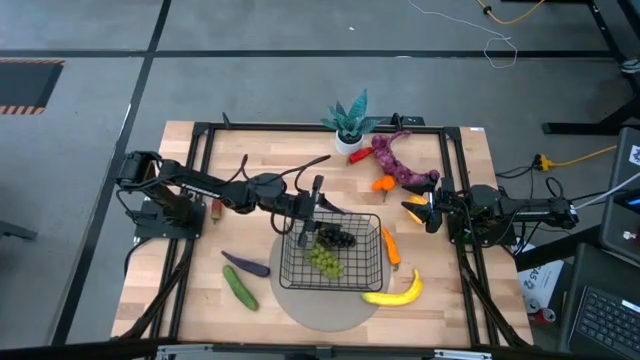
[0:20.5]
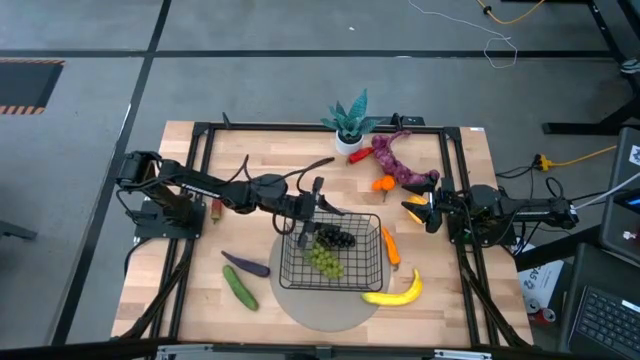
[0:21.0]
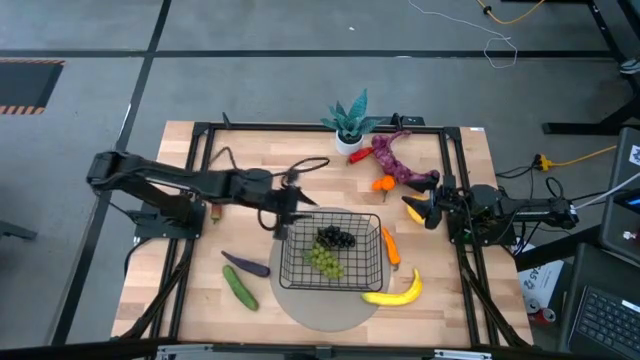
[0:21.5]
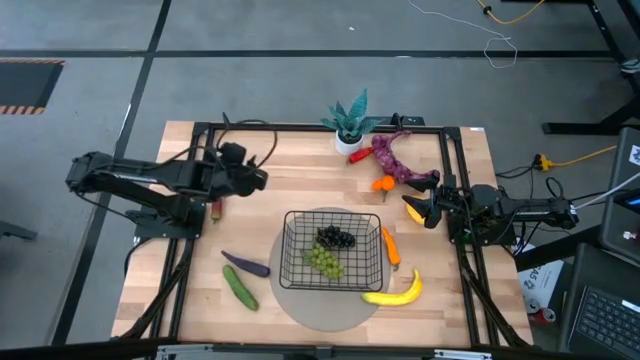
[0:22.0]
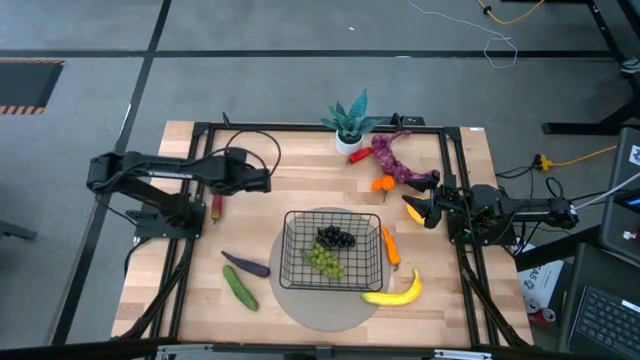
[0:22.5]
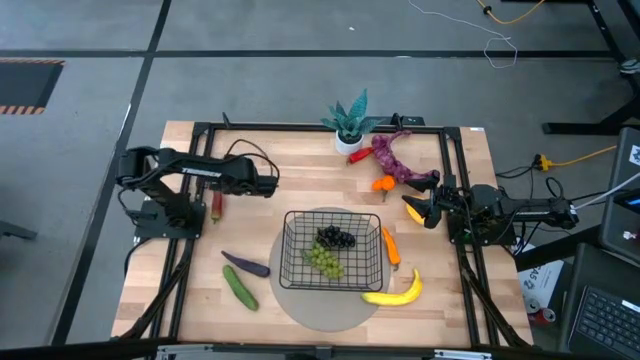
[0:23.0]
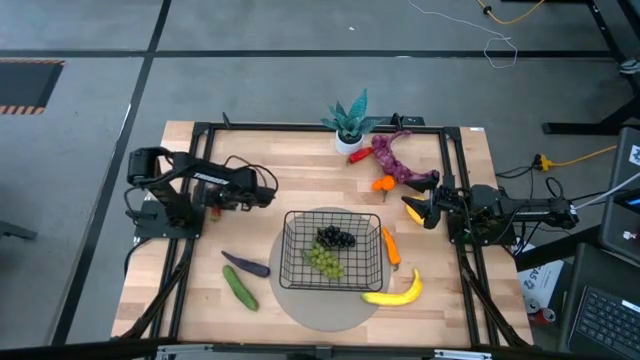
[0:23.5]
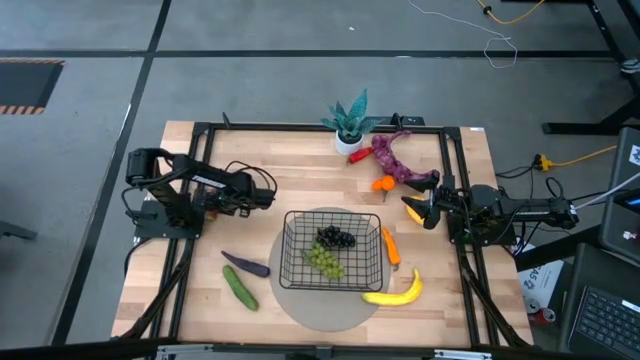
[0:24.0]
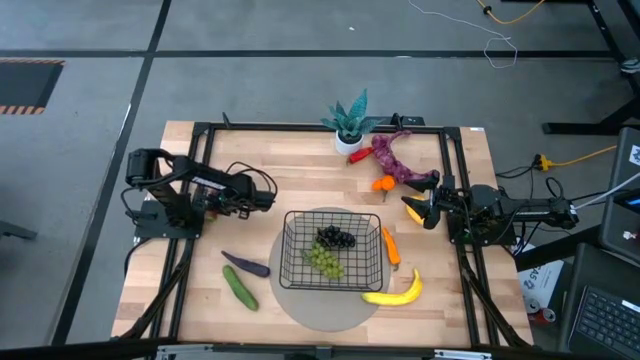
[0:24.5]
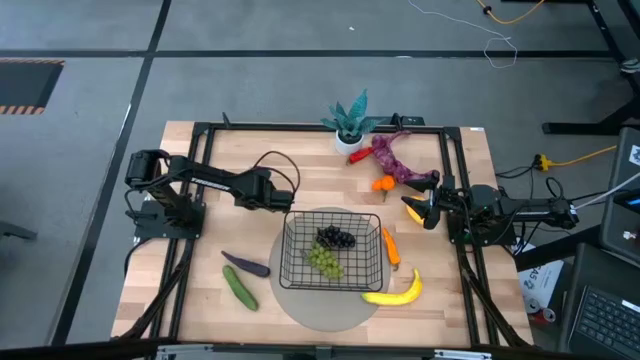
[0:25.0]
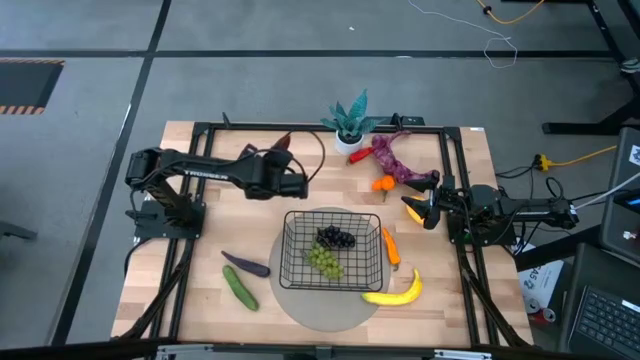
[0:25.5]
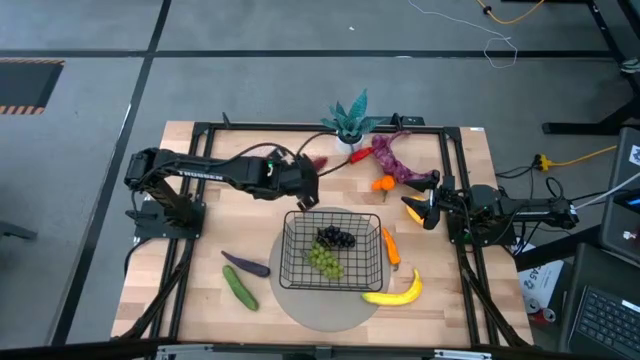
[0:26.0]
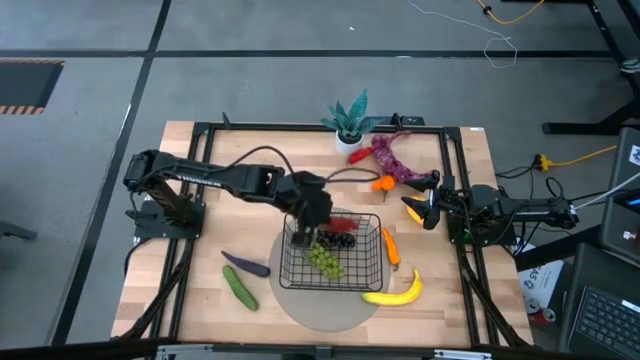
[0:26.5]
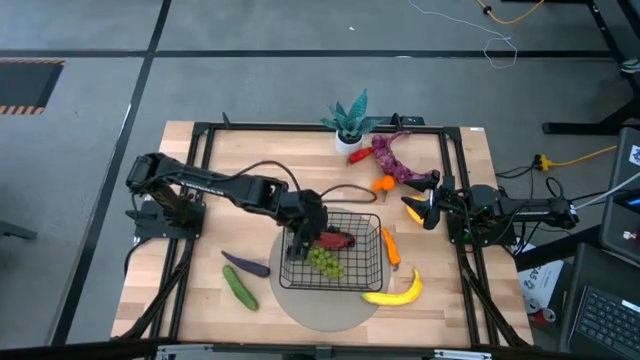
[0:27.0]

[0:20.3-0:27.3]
Task: Build produce basket
Put the dark red chili pepper into the black wire basket

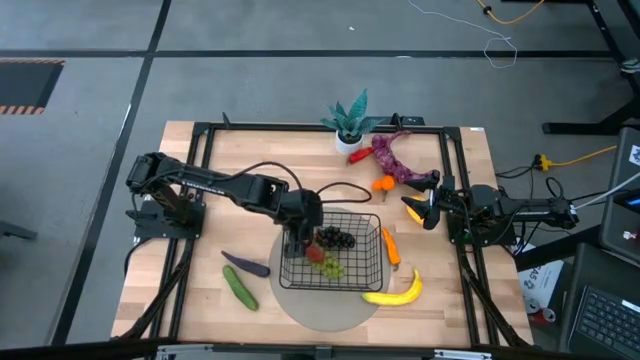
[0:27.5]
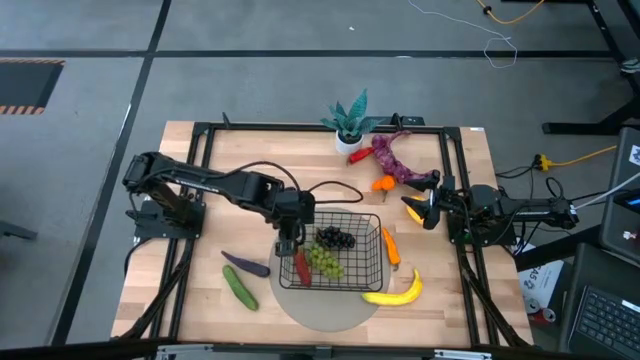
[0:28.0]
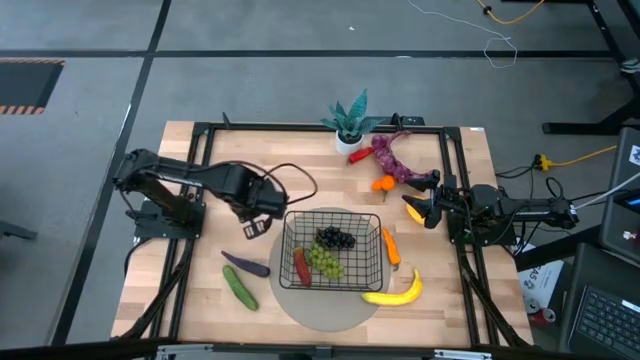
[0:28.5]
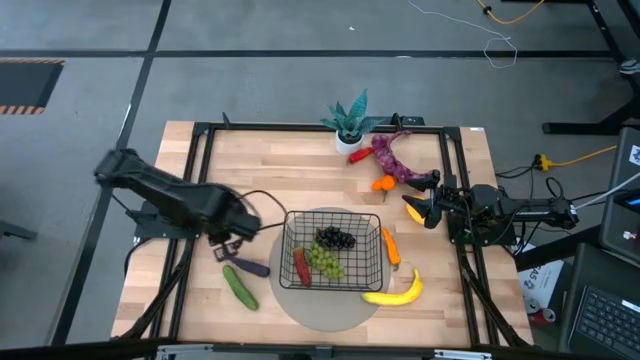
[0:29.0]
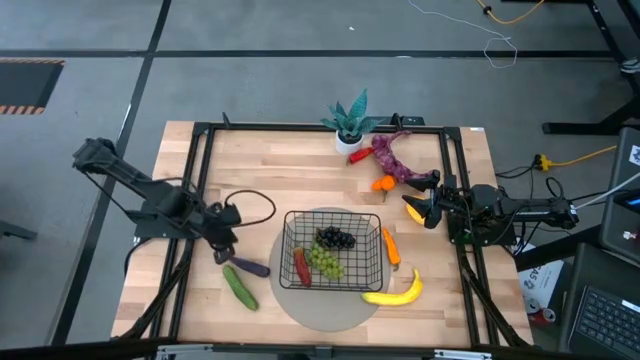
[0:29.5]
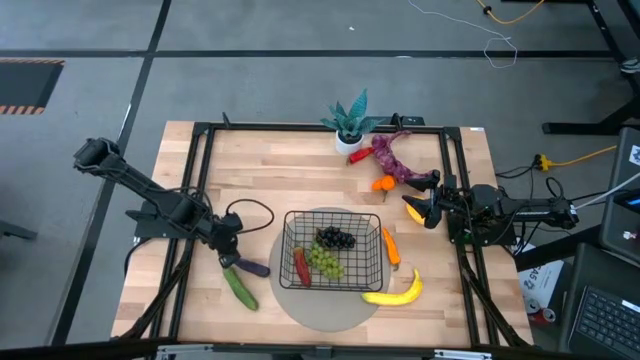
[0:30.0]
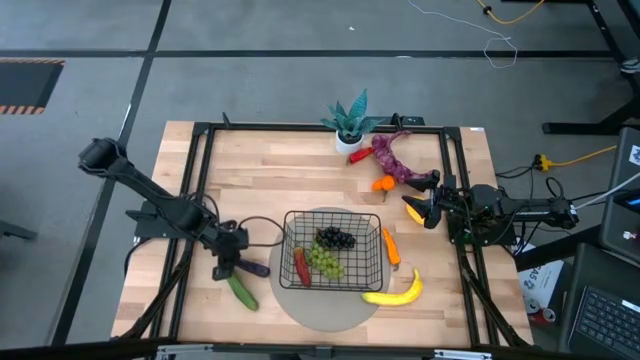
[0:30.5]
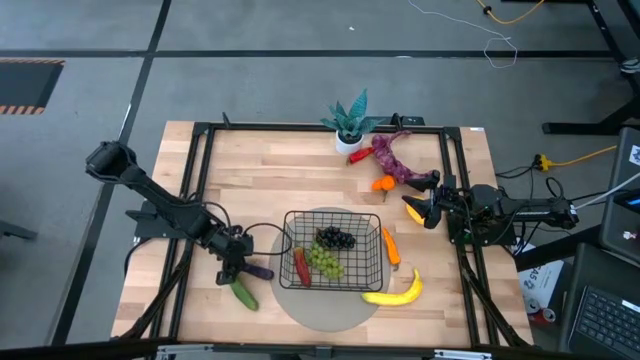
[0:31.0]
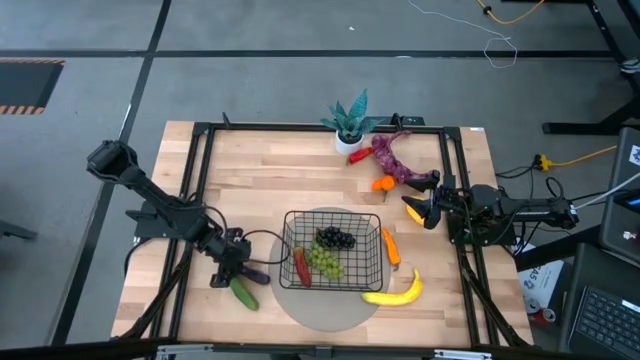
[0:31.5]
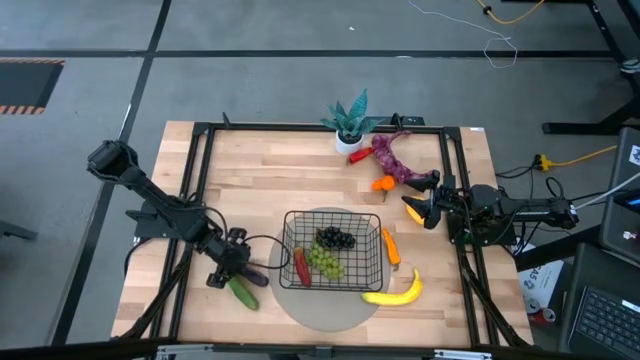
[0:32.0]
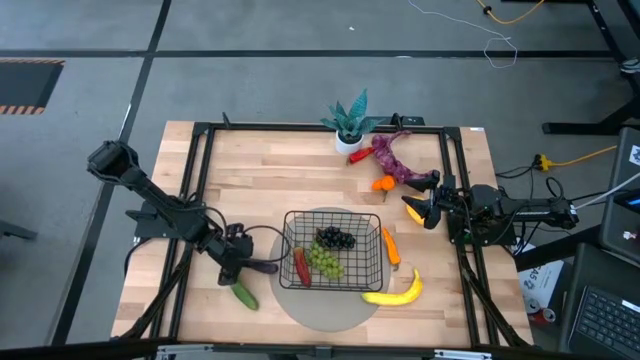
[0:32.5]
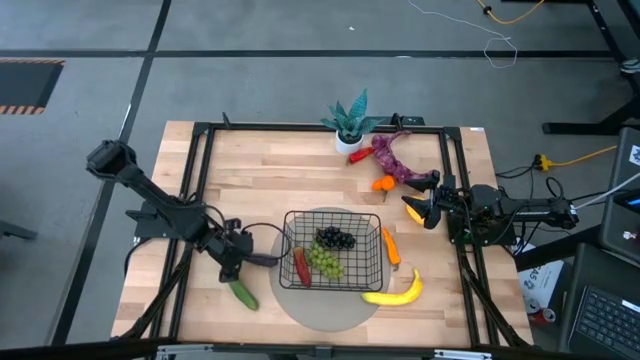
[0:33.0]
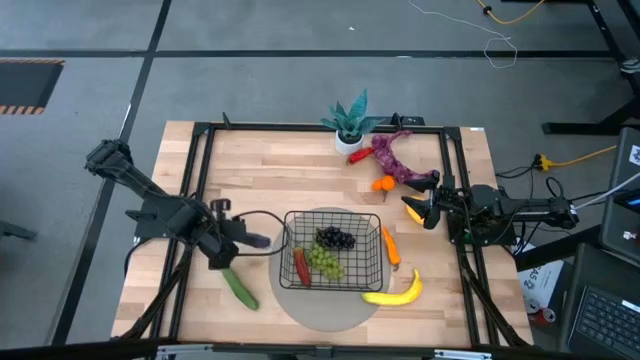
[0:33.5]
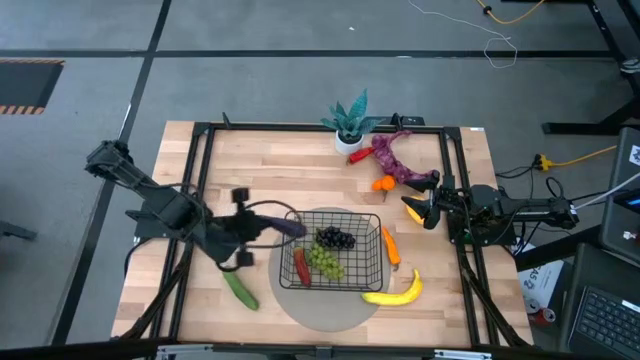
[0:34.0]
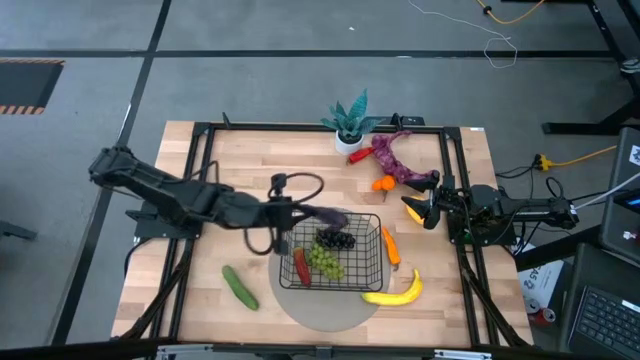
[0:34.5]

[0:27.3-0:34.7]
Put the violet eggplant into the black wire basket

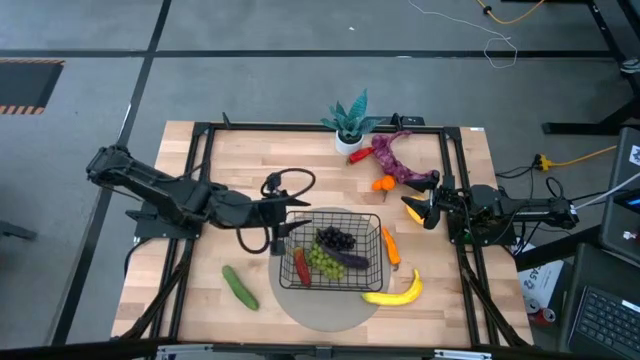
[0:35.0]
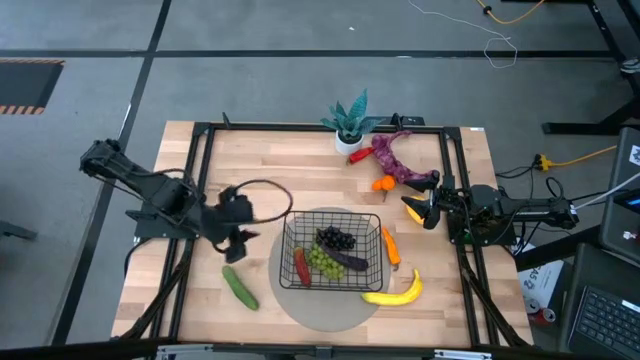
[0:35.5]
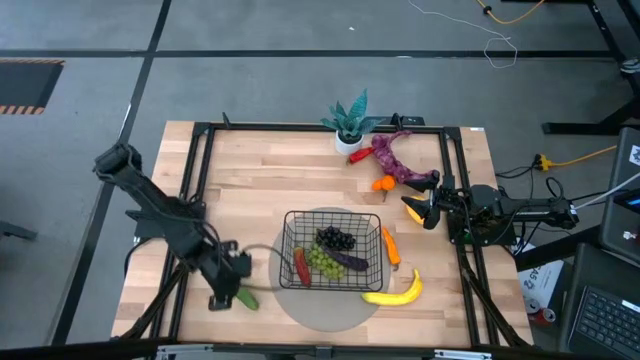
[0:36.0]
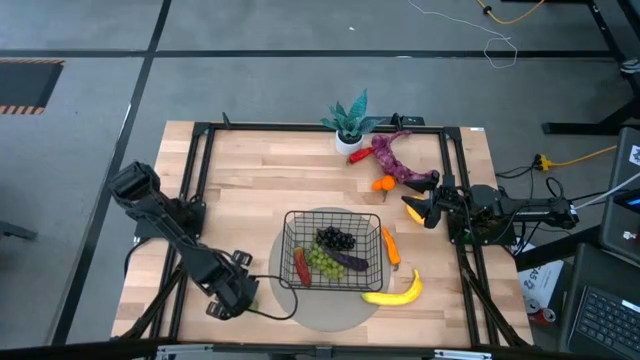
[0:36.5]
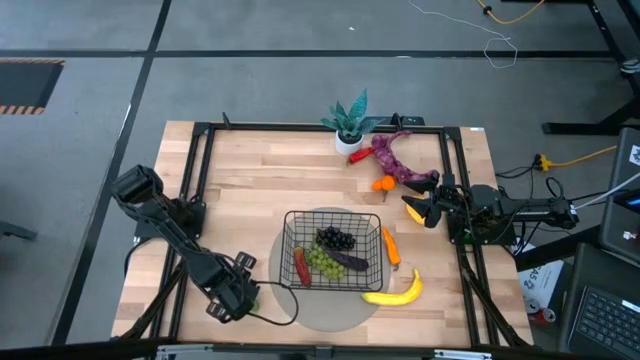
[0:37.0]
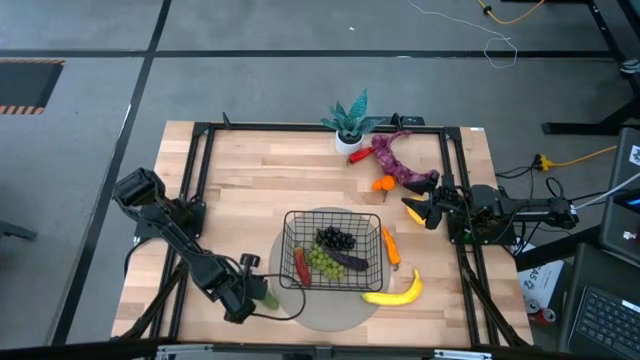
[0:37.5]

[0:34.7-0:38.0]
Put the green cucumber into the black wire basket

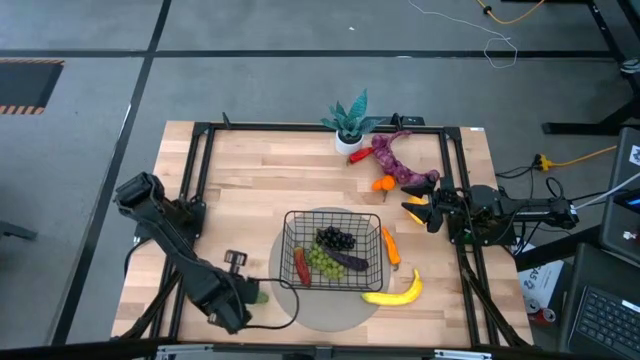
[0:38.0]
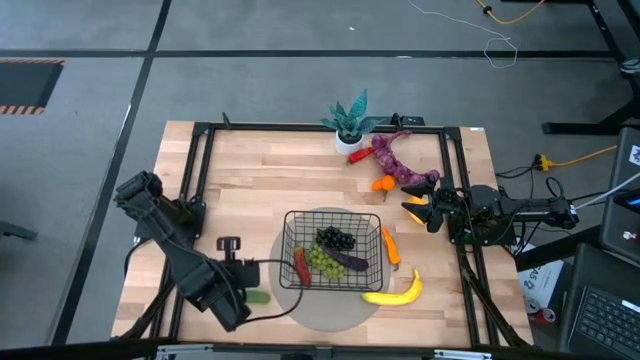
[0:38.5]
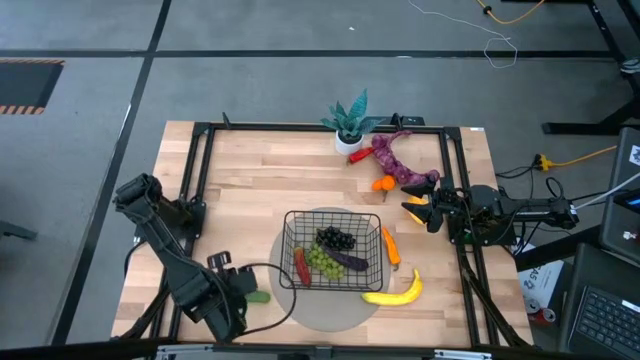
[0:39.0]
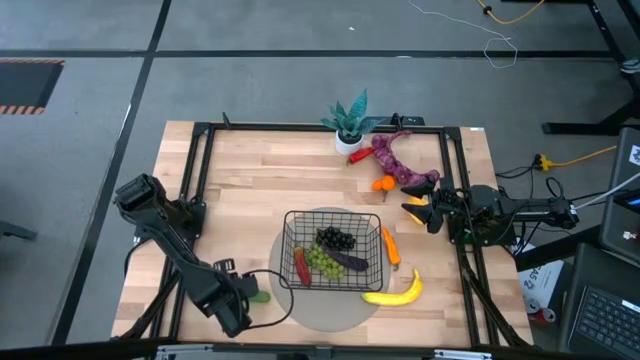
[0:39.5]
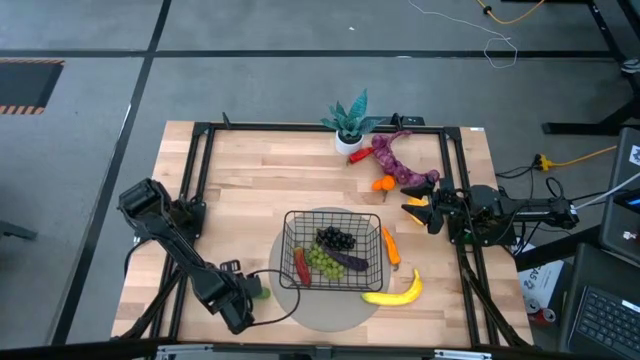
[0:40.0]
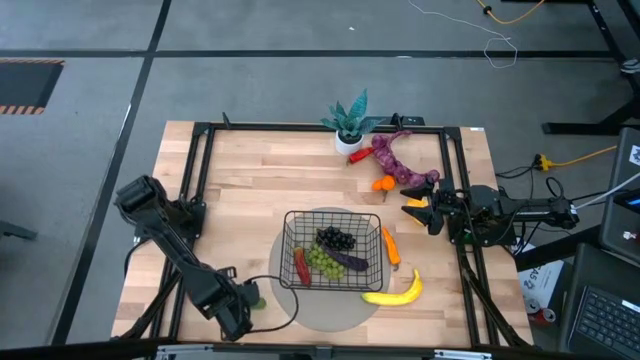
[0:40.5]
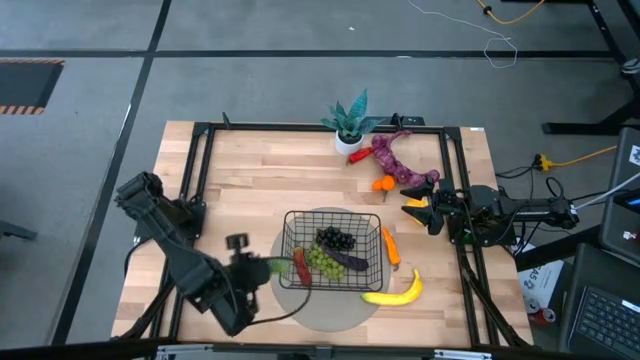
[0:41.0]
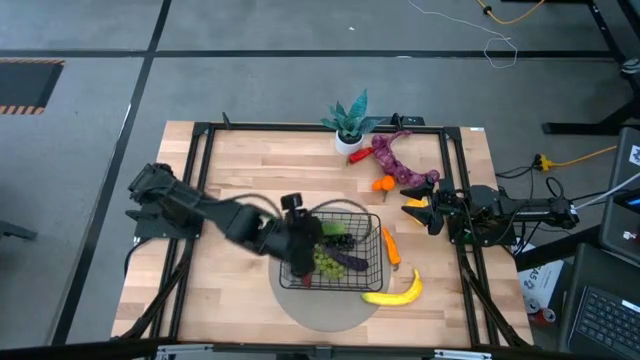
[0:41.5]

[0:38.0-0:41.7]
Put the green cucumber into the black wire basket
